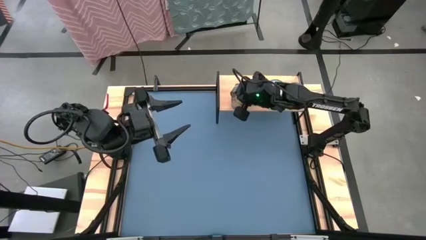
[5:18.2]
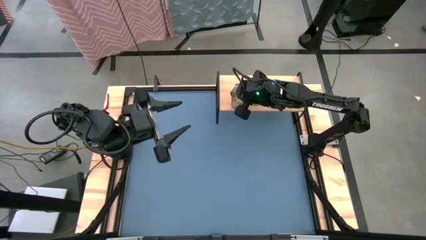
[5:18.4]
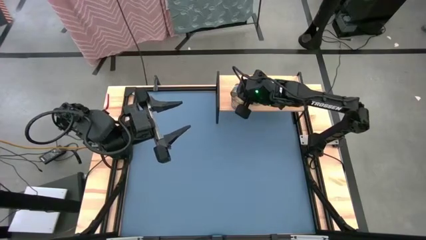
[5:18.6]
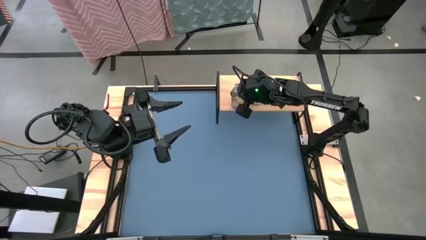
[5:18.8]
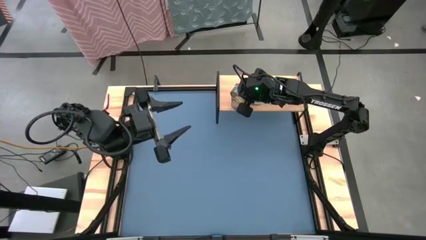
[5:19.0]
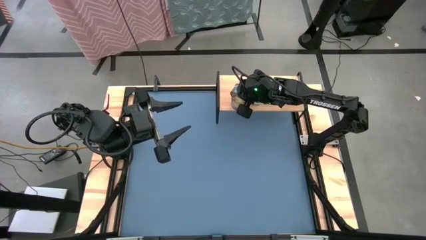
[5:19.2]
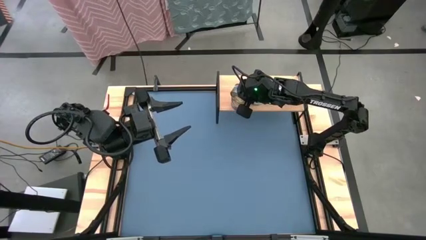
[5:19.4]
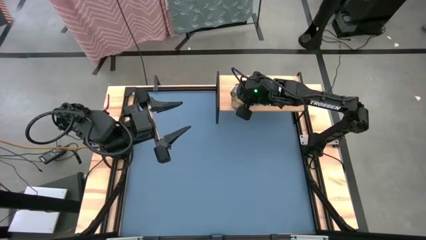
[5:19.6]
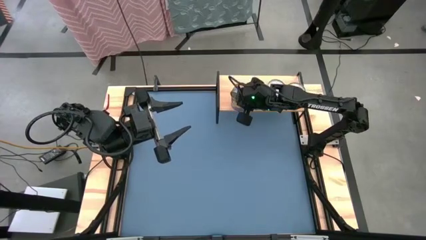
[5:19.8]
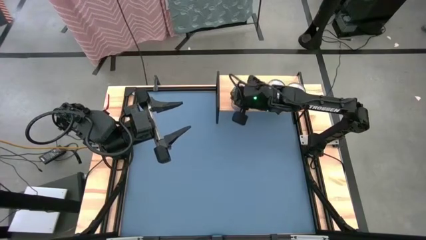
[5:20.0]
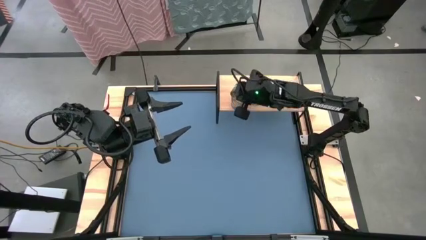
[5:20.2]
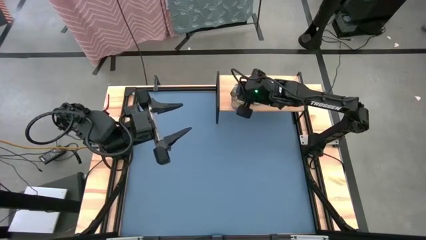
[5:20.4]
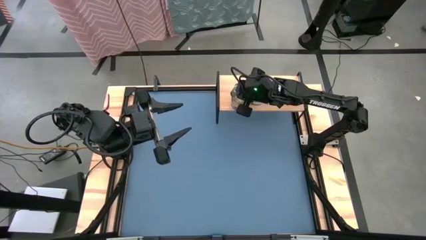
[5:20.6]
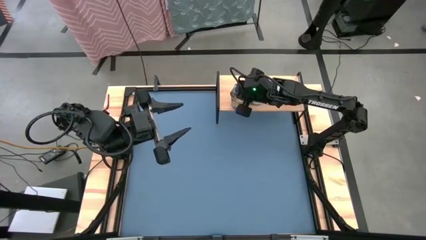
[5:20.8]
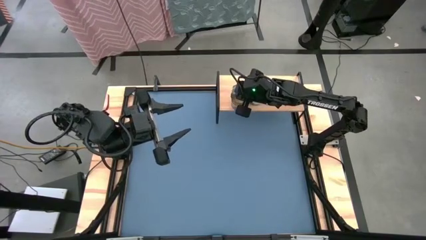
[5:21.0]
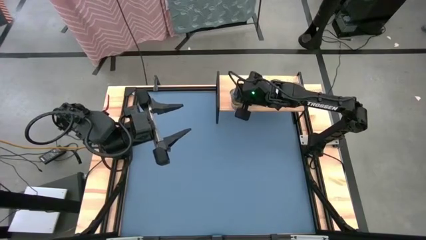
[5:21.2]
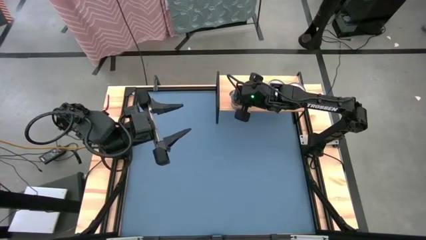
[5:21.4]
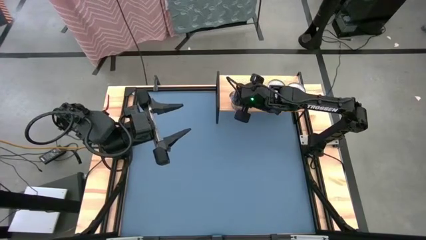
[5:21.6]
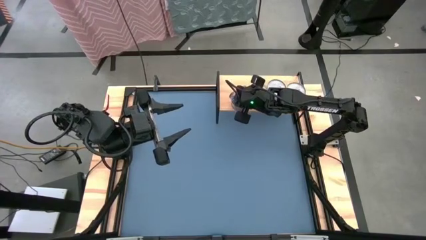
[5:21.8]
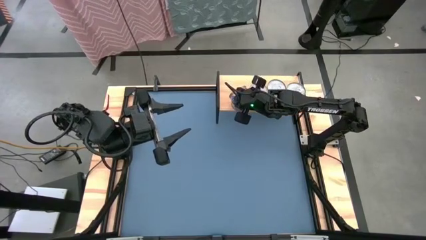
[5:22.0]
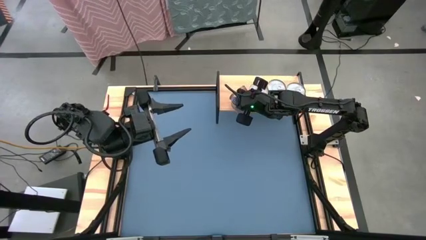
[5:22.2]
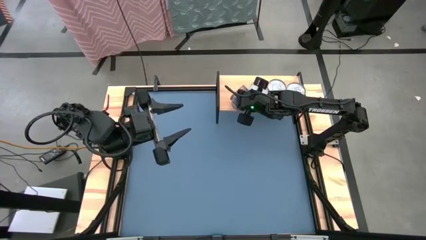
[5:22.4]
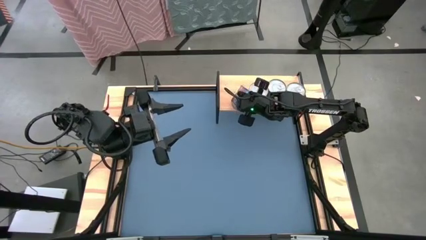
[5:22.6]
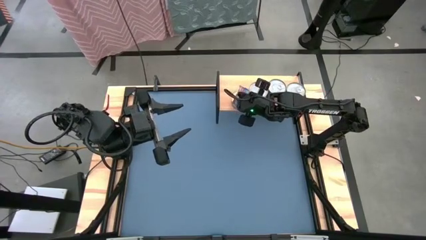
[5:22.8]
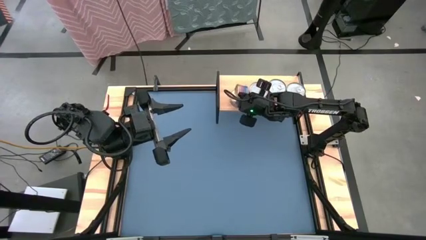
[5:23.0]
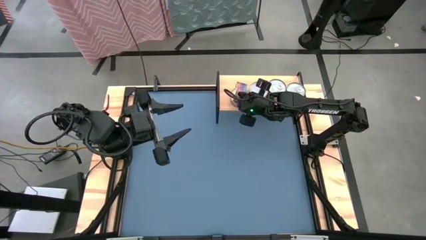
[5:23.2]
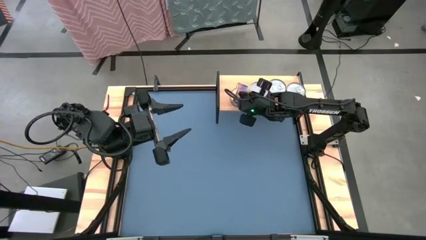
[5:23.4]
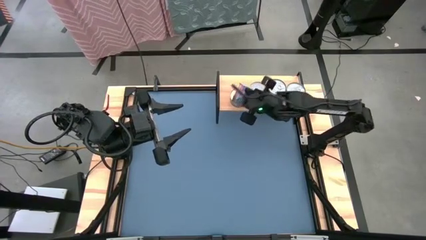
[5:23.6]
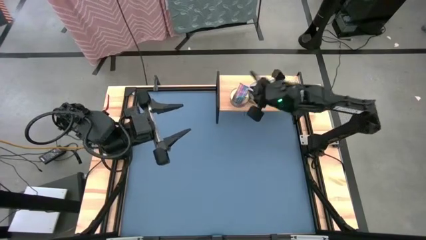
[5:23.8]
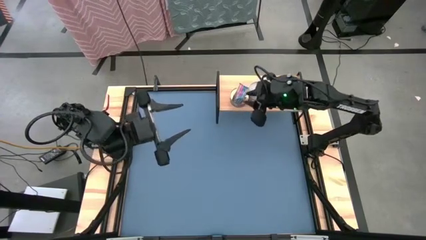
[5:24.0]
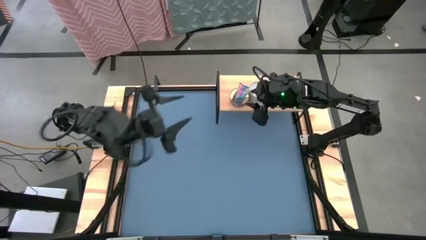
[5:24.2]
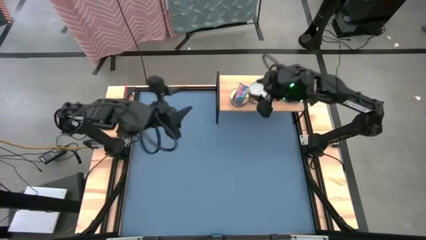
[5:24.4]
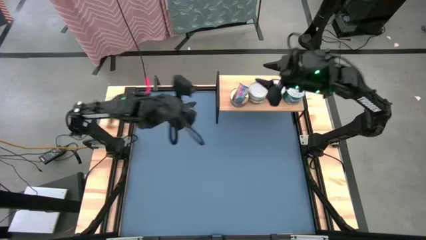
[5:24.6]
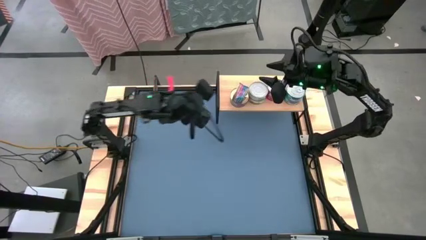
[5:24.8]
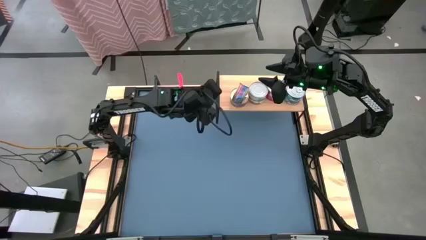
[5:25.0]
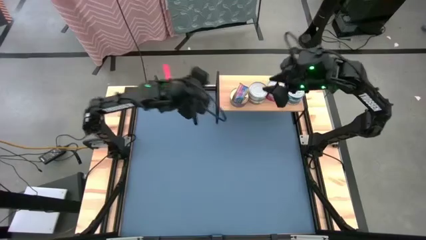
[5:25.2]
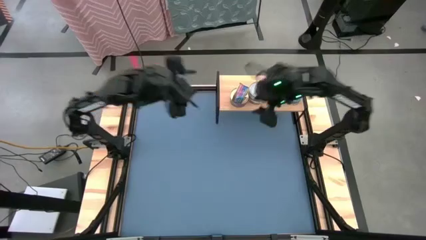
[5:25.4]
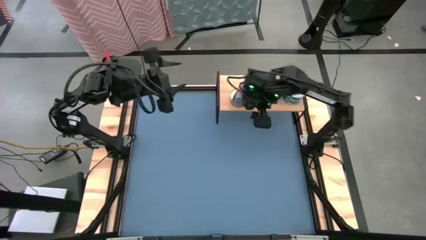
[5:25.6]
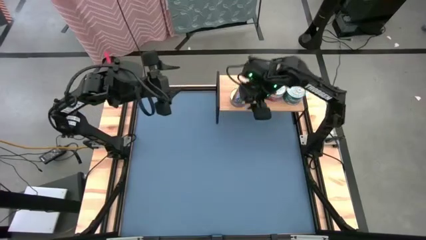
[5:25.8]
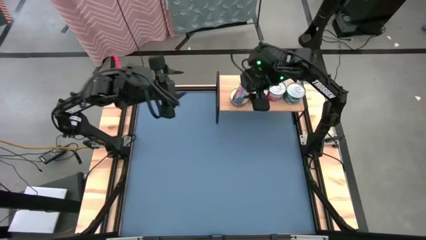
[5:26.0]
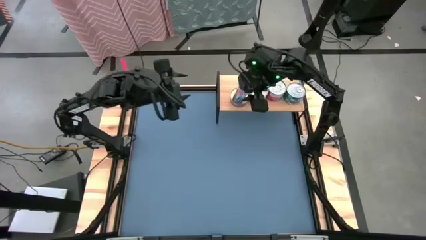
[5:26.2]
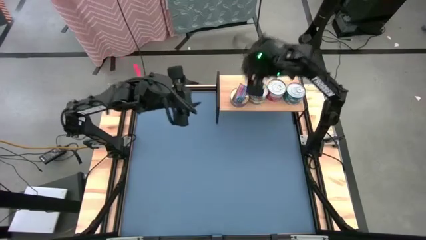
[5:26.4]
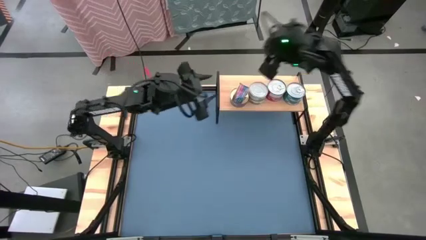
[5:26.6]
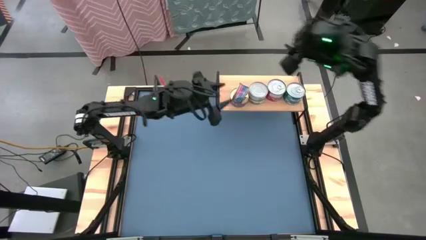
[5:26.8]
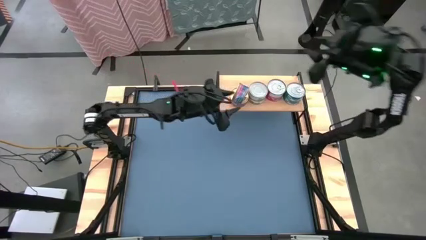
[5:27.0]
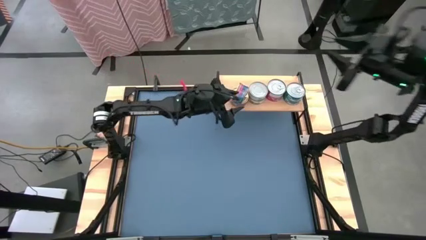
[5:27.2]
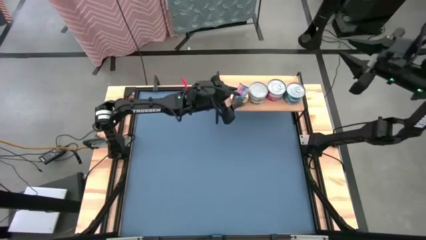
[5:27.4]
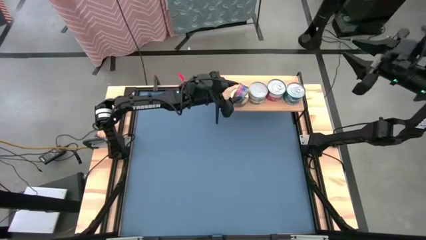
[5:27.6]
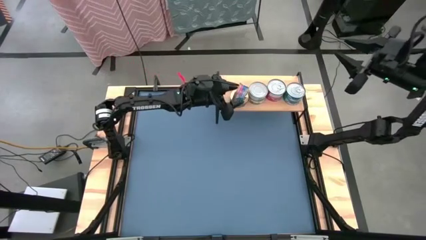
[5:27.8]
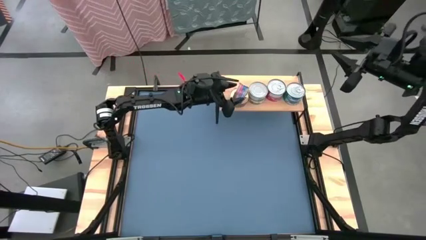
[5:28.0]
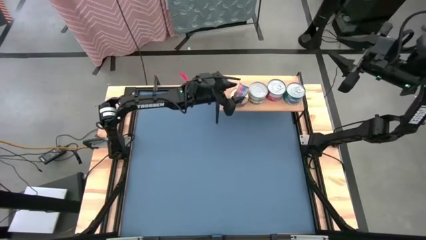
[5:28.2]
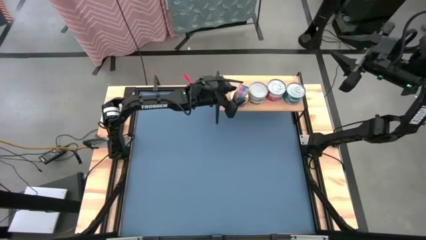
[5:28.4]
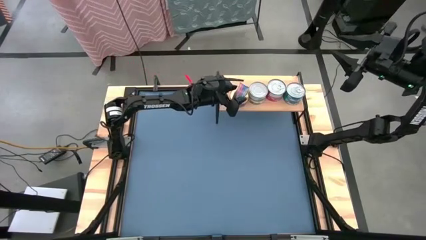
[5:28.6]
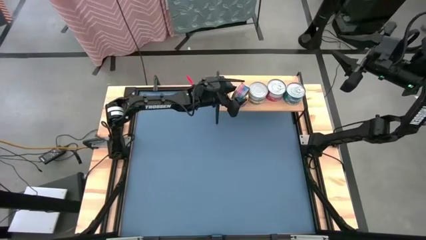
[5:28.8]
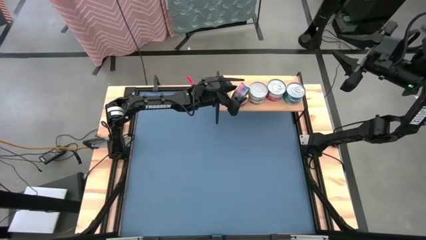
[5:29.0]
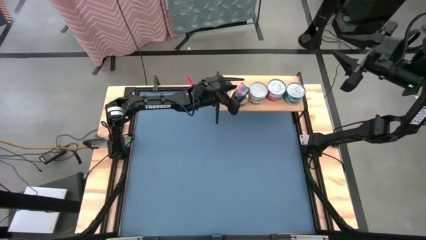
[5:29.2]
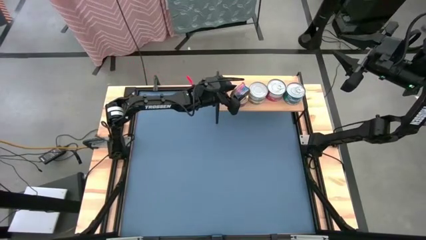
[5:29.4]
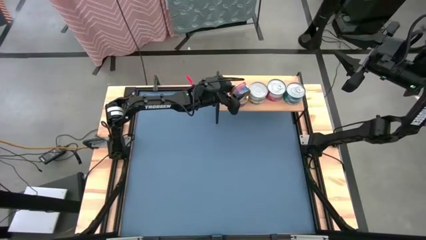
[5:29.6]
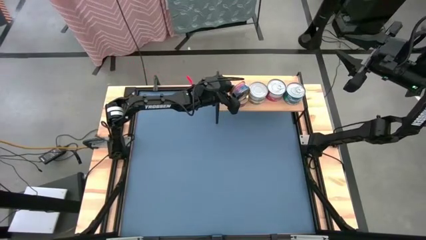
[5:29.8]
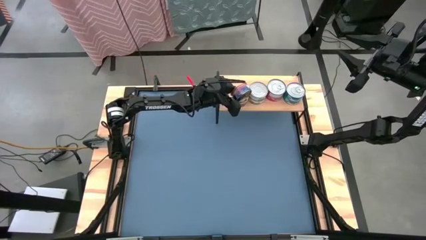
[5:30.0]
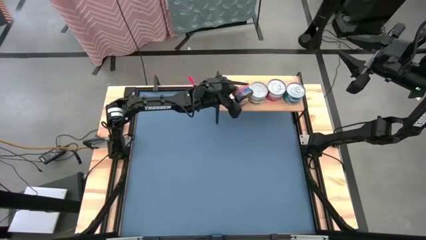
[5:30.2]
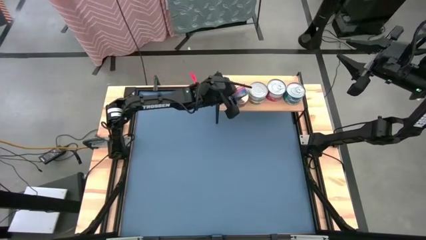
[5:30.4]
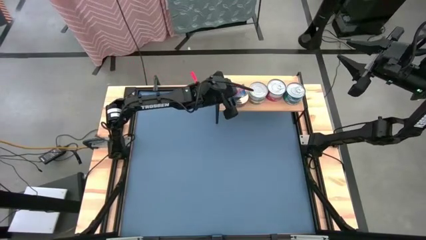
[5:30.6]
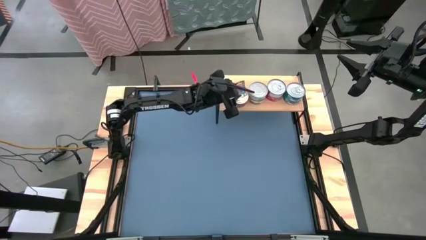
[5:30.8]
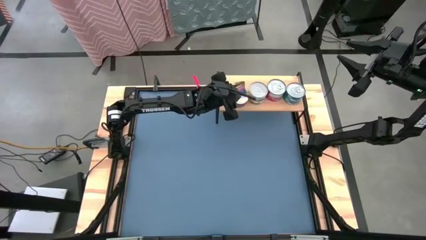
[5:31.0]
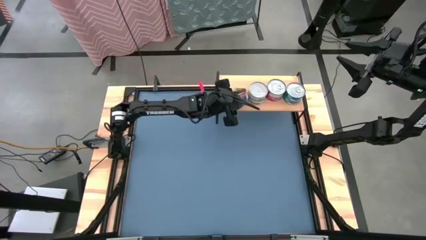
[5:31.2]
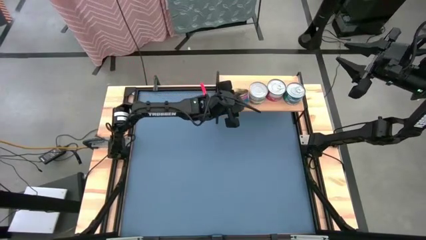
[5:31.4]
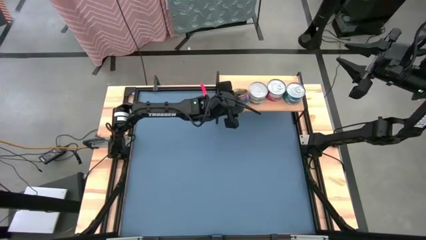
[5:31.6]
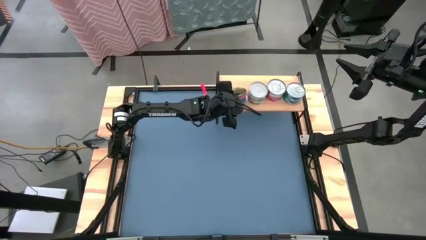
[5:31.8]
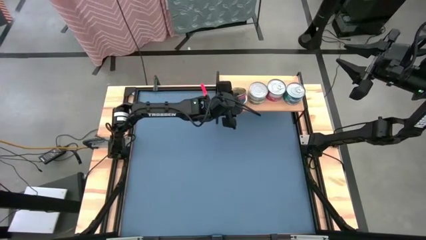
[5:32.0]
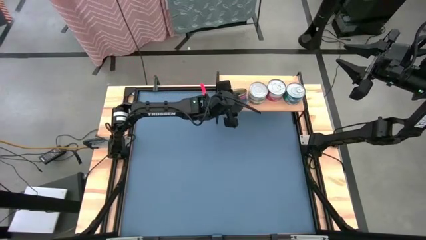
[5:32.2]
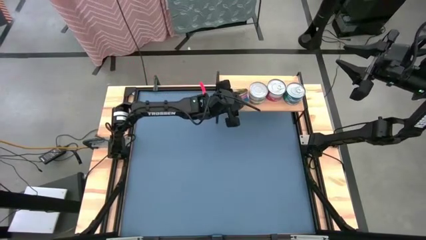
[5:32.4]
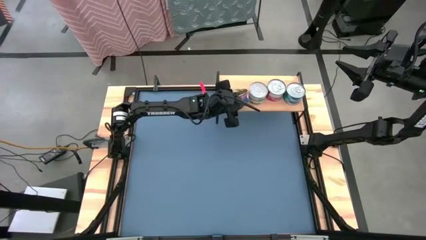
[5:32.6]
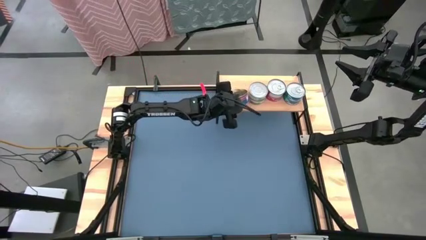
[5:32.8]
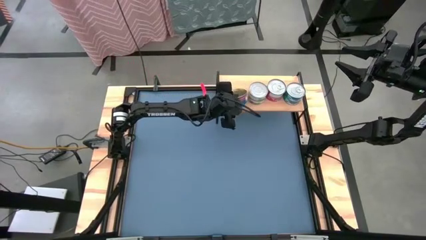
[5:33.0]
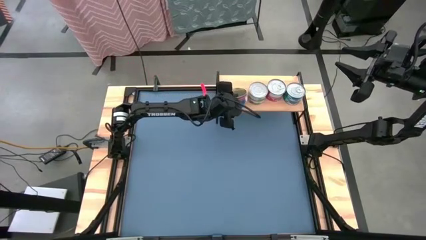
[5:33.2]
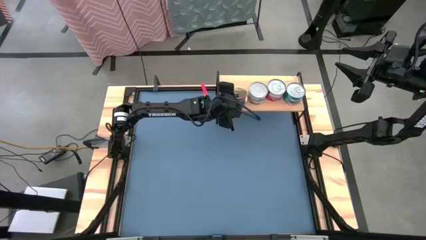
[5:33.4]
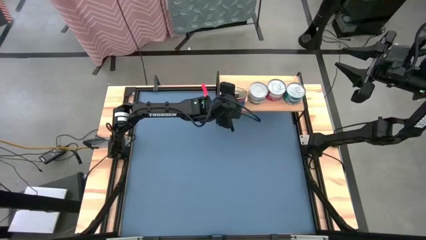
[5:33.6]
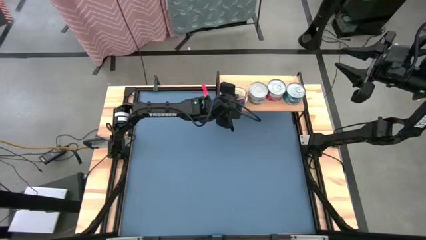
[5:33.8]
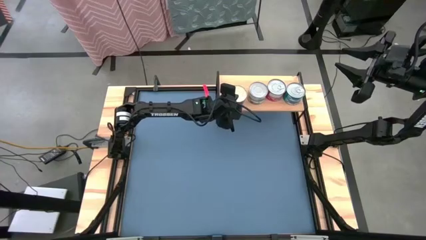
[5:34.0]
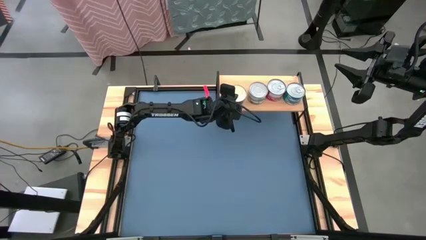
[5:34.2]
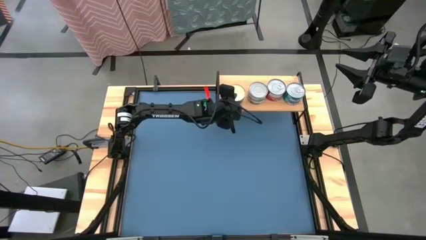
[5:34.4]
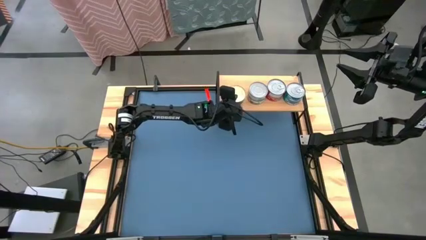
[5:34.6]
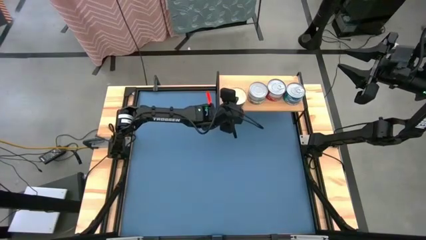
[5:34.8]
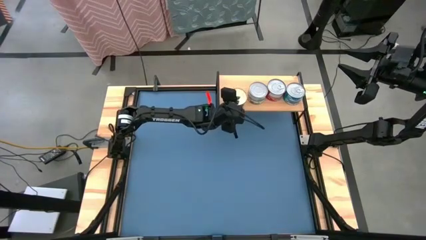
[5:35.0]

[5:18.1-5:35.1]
Task: Stack canned seafood by type on shelf
Stack the blue-pink tuna can on top of the blue-pink tuna can on the shelf
